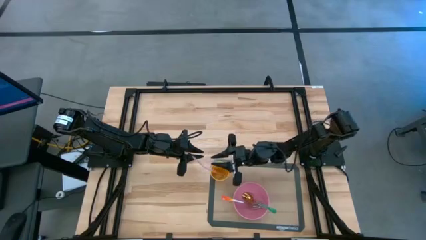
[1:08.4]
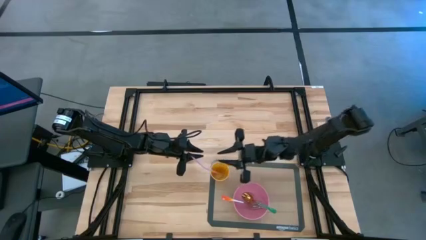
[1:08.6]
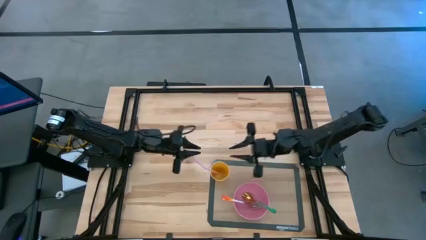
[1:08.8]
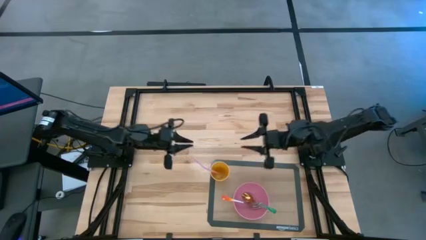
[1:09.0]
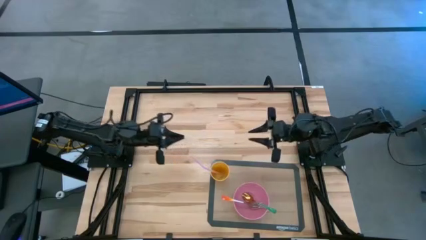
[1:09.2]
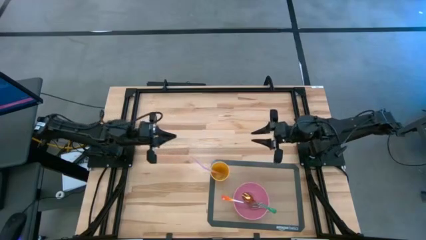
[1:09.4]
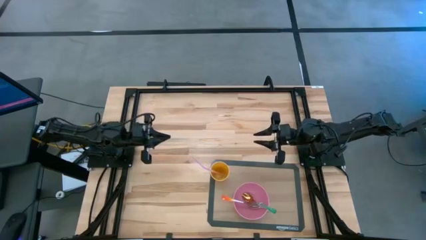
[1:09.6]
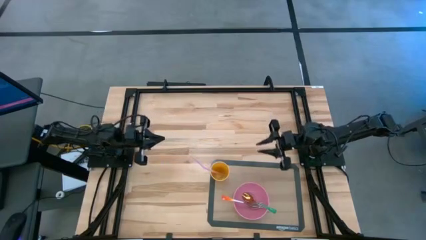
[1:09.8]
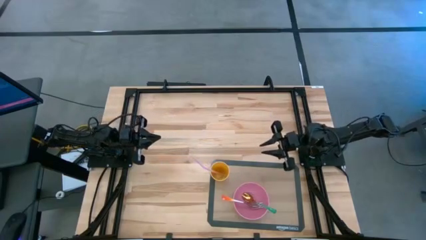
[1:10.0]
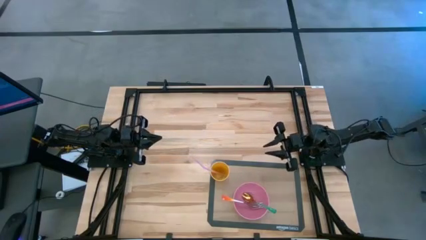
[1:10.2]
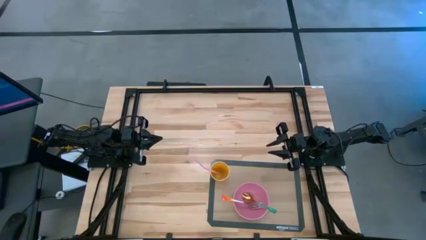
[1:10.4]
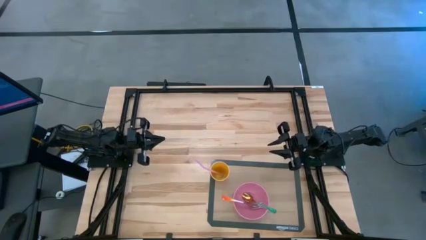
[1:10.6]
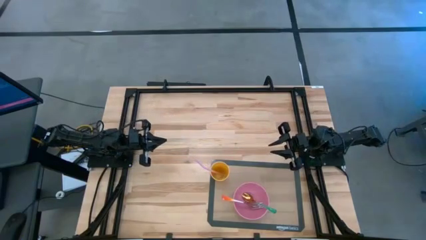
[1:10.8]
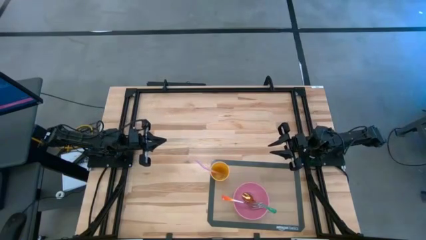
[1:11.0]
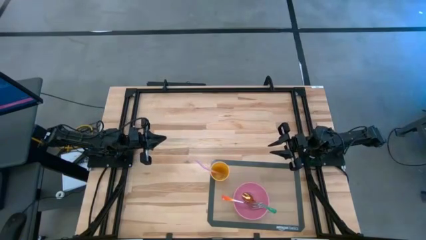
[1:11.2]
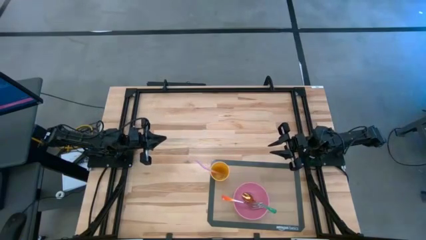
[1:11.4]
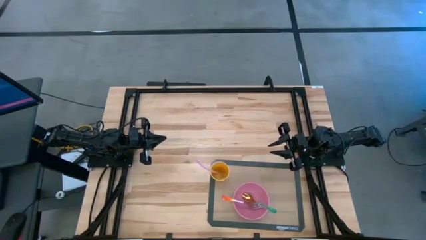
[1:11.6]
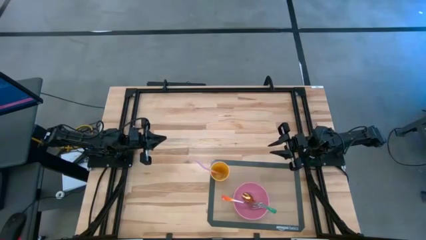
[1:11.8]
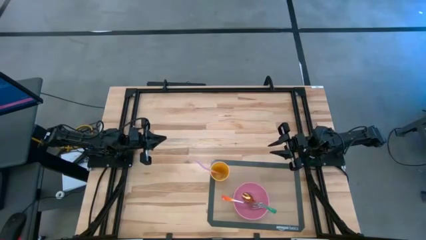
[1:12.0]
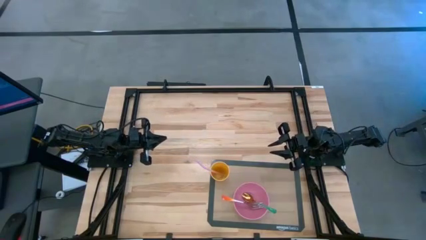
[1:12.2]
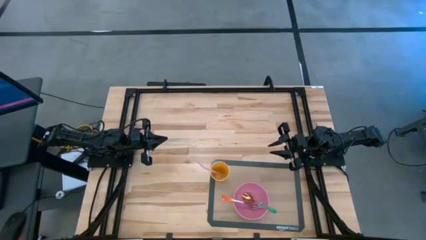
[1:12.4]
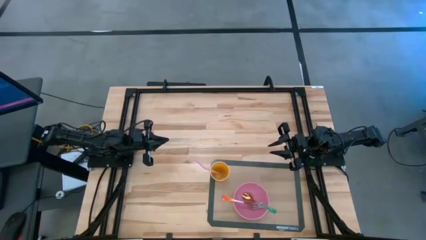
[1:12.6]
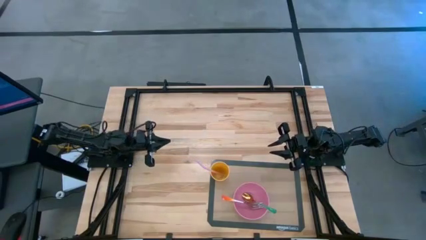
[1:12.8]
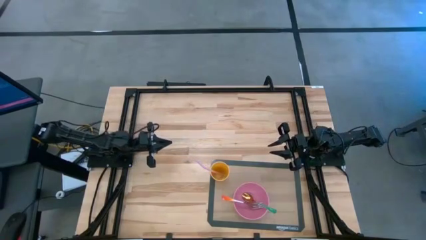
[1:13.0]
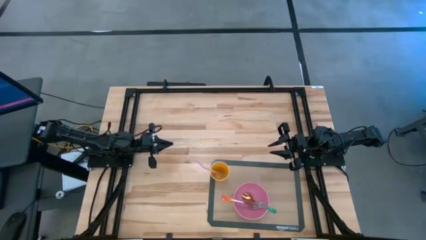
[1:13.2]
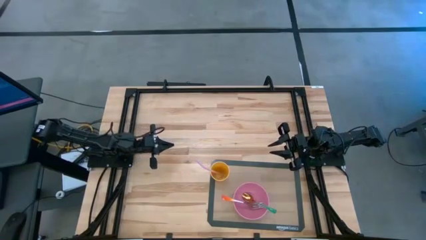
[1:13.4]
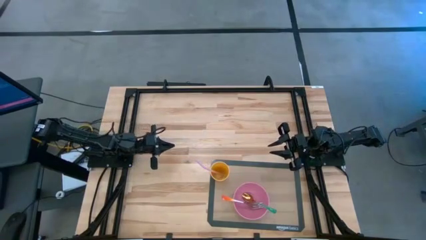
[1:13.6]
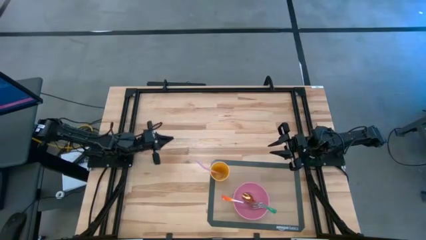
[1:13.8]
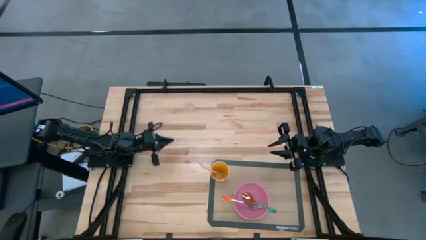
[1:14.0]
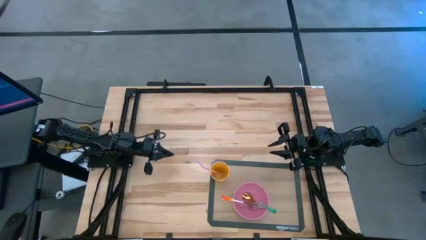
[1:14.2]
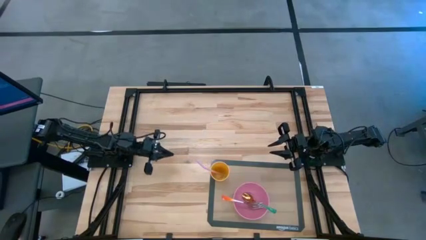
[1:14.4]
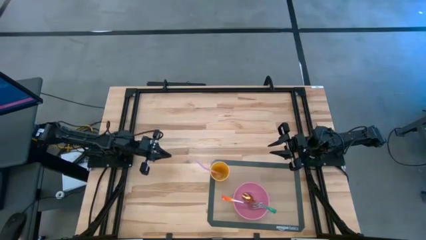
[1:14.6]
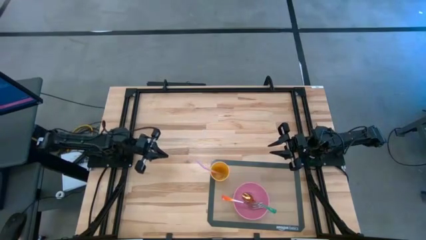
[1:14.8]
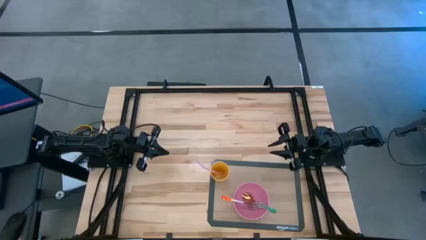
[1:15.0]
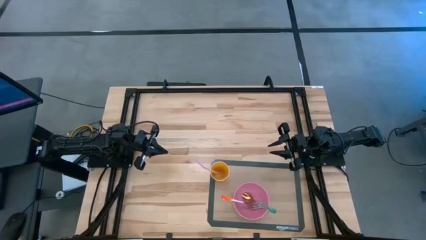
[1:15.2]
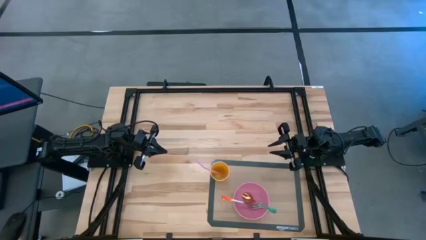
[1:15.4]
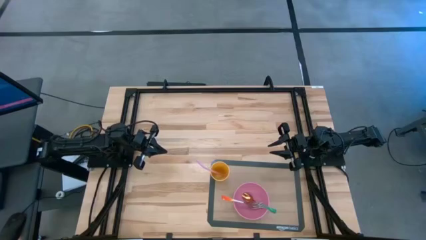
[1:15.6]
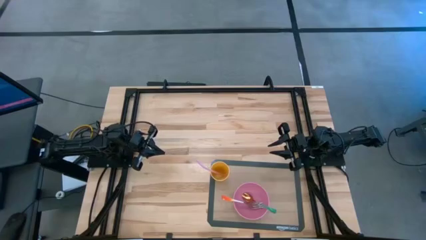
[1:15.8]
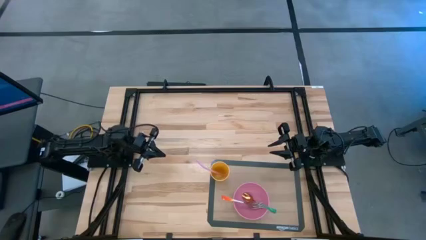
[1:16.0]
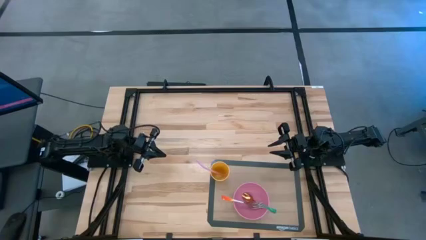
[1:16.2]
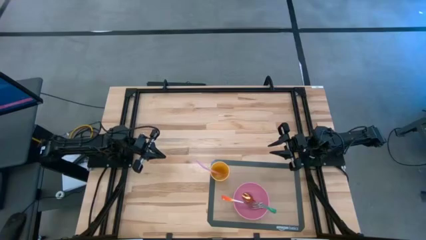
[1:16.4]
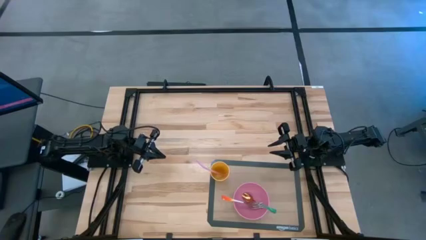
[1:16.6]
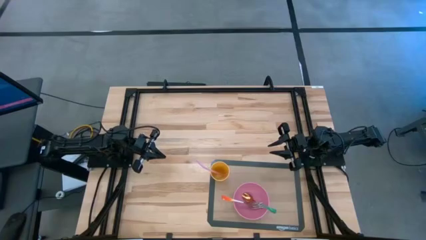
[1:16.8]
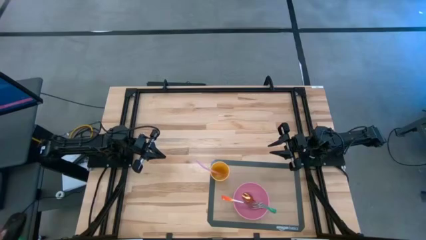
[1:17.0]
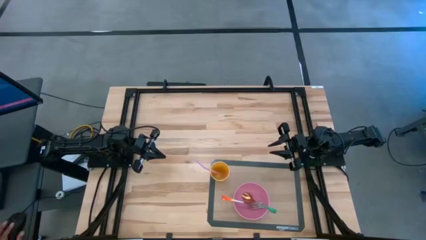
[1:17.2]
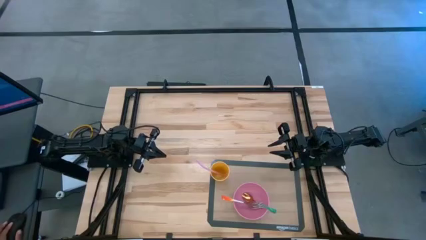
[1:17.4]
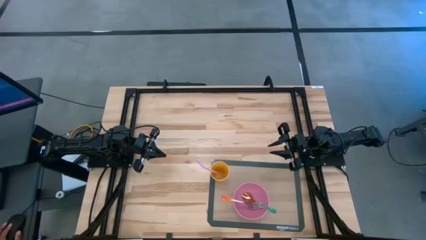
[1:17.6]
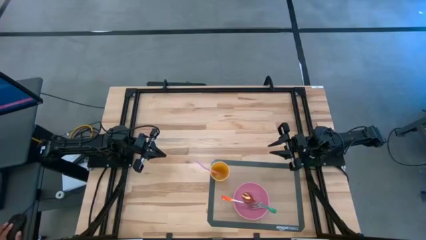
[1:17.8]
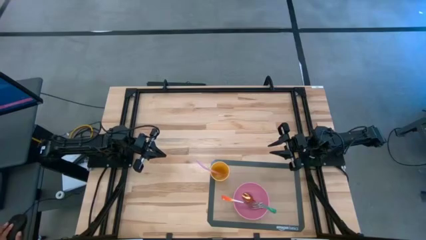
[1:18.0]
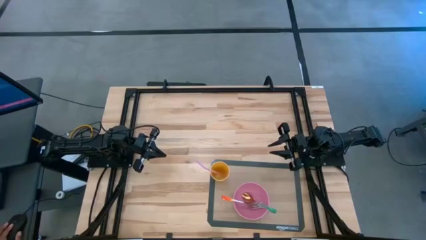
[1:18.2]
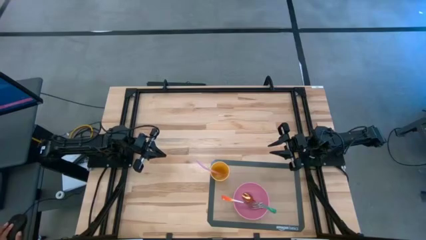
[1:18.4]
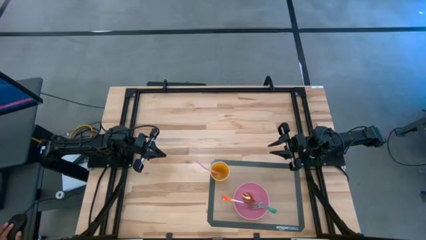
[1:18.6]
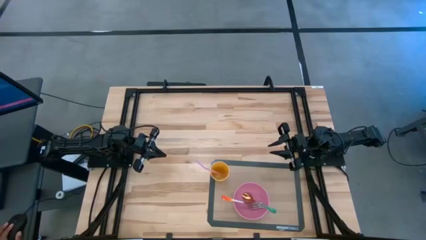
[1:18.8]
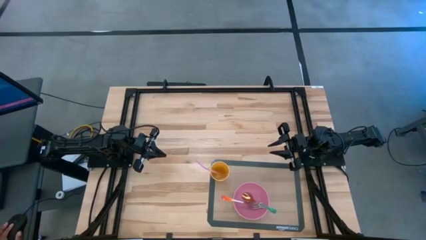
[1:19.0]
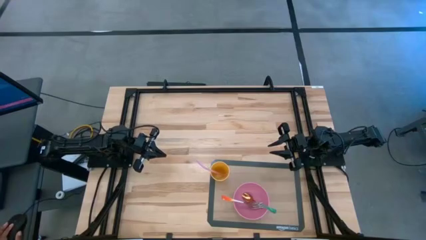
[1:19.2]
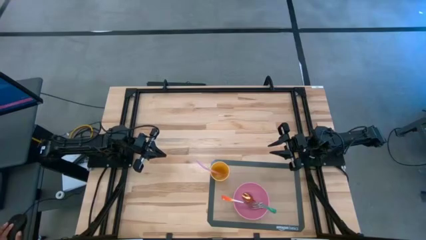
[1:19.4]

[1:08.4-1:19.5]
Task: Pick & Place Utensil
Return to Home Position

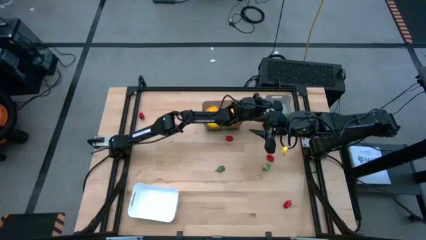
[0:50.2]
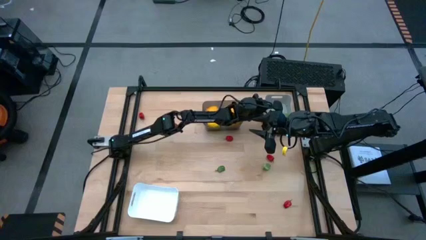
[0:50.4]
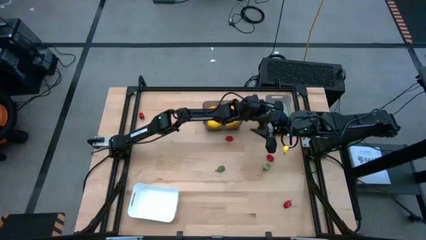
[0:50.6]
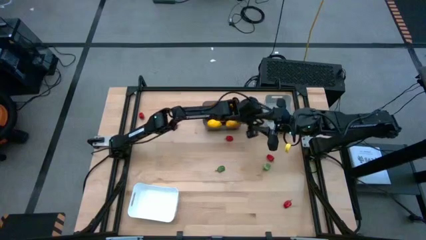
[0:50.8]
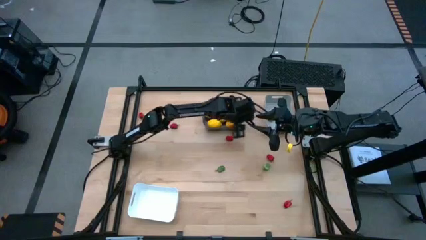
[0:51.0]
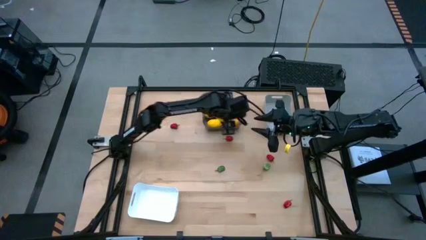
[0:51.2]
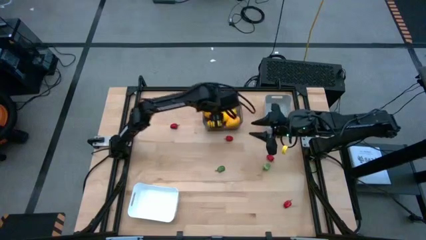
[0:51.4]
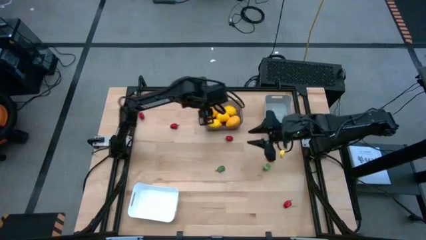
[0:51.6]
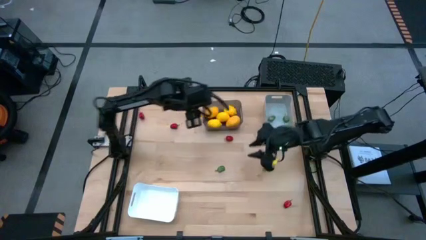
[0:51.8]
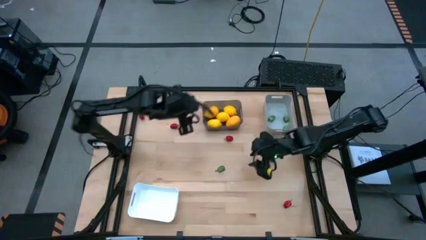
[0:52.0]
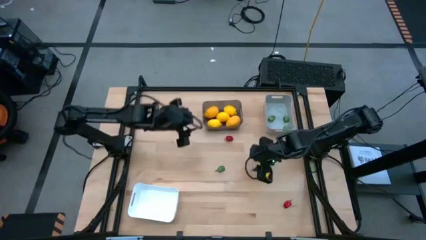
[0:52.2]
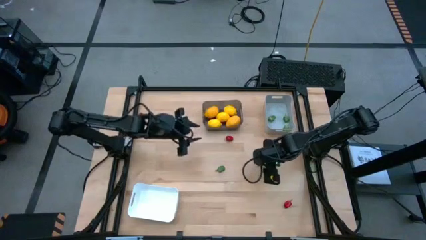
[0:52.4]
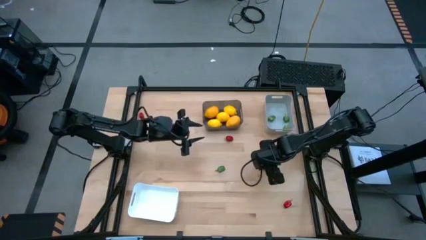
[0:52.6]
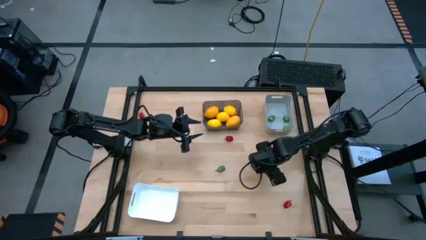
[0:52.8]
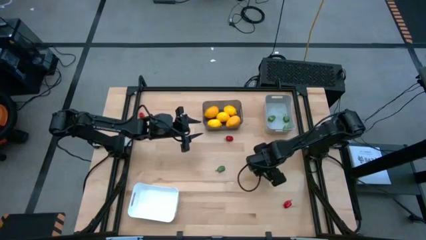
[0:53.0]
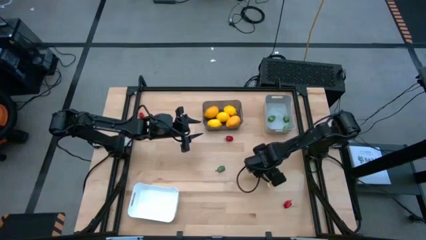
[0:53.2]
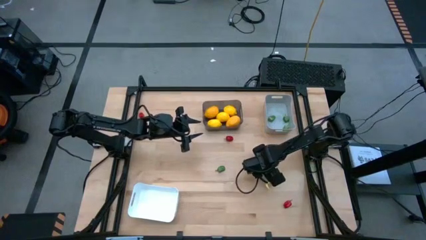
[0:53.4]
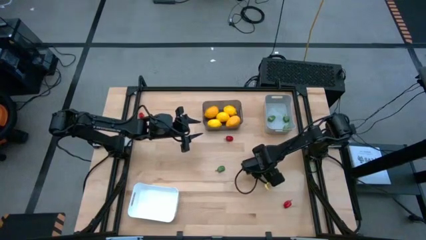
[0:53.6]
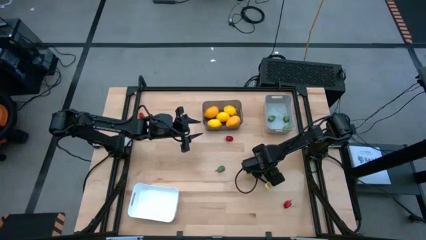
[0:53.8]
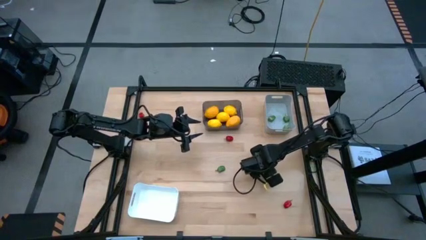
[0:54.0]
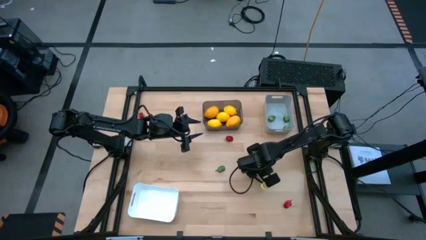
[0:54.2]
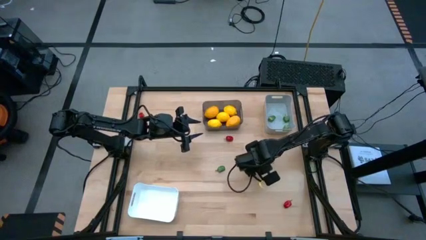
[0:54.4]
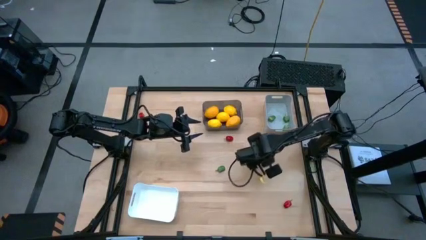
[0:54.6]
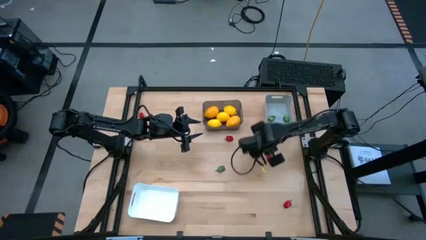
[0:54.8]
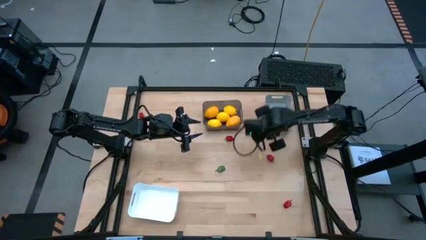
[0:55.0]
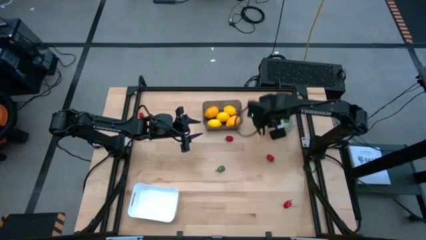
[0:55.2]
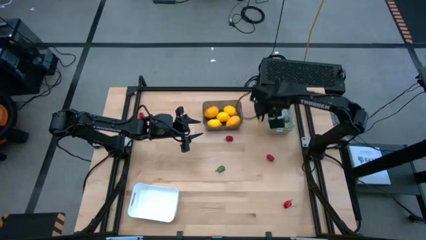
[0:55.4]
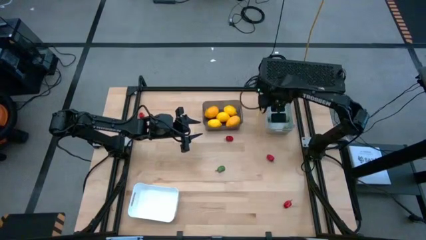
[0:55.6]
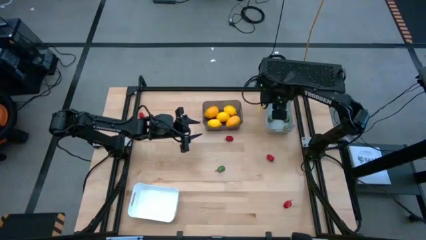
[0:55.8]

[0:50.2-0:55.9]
Task: Sort produce into baskets
Put the green pepper into the gray bin
